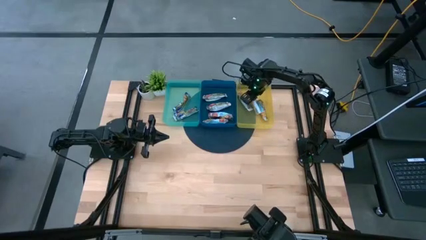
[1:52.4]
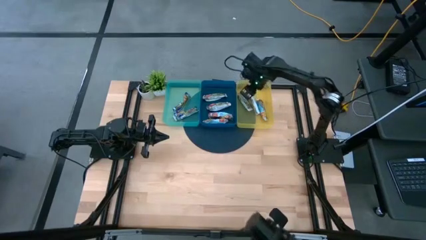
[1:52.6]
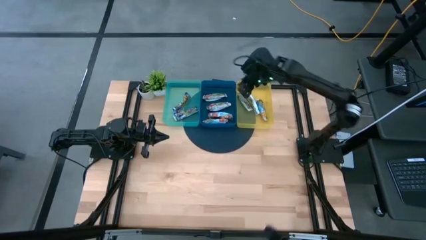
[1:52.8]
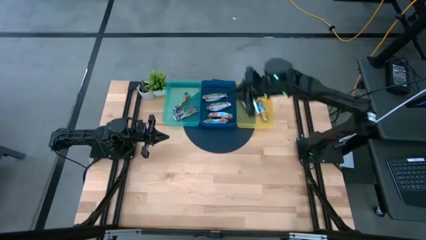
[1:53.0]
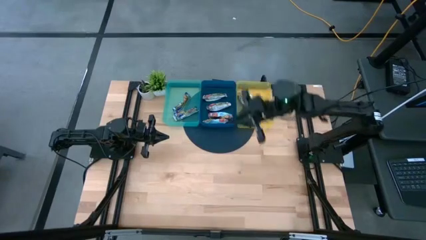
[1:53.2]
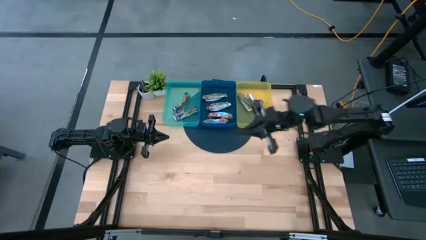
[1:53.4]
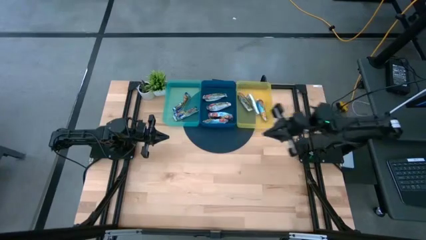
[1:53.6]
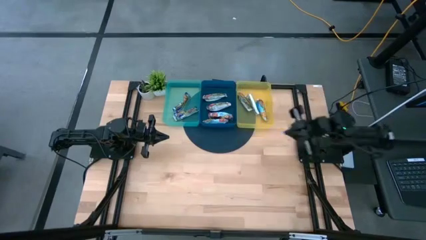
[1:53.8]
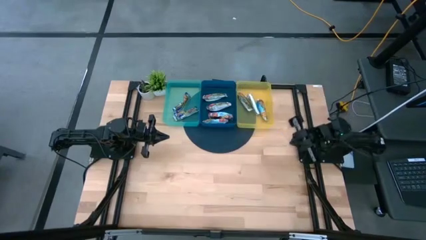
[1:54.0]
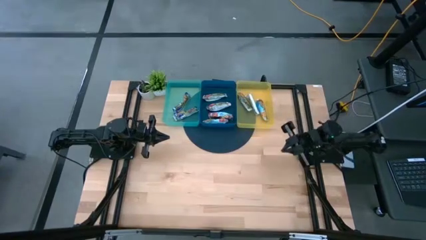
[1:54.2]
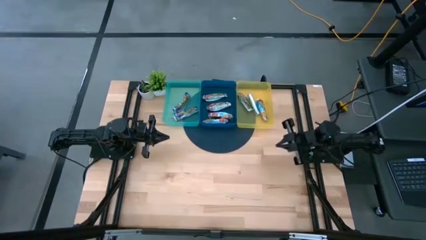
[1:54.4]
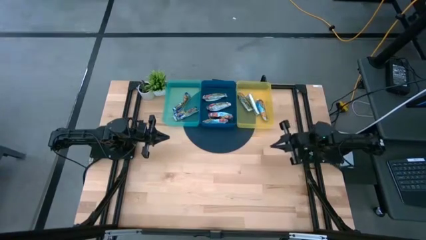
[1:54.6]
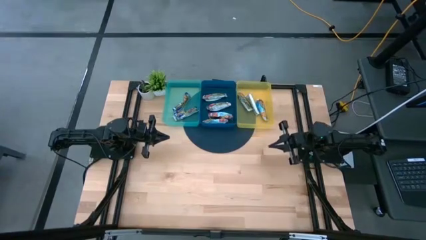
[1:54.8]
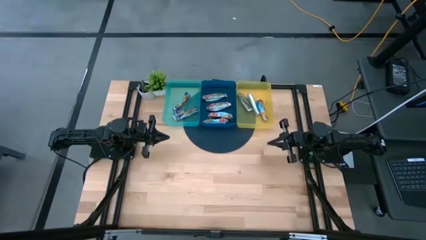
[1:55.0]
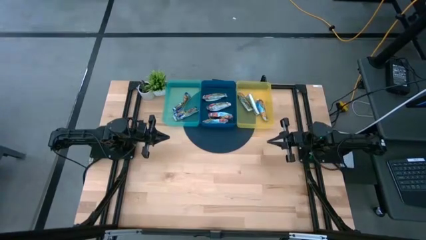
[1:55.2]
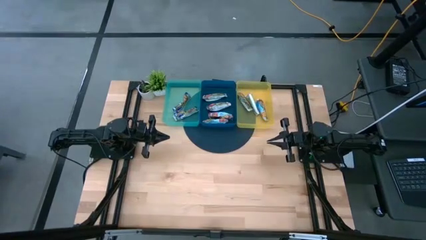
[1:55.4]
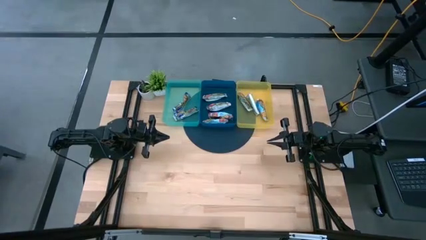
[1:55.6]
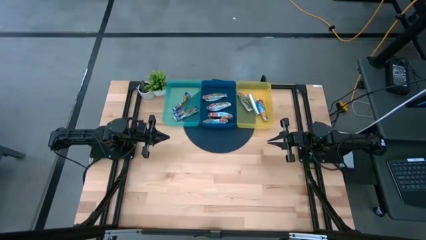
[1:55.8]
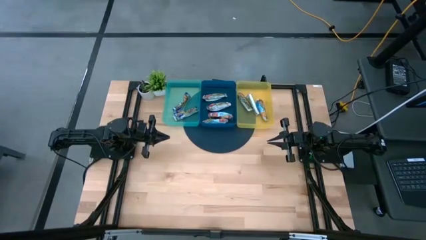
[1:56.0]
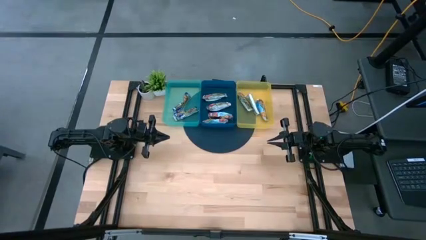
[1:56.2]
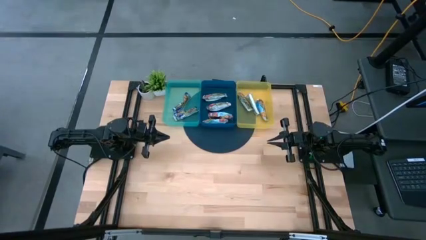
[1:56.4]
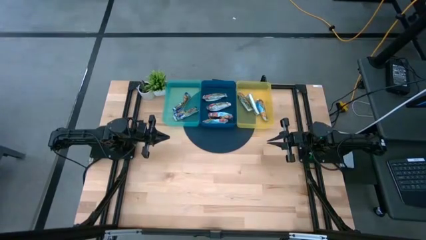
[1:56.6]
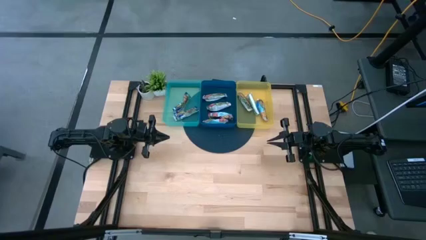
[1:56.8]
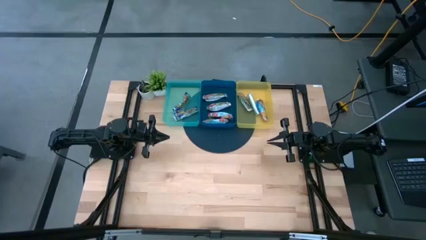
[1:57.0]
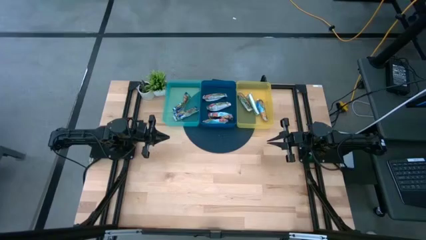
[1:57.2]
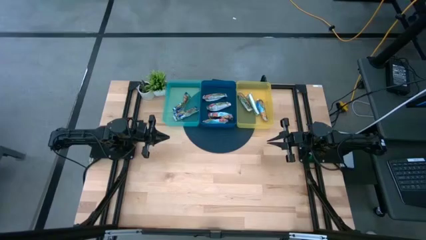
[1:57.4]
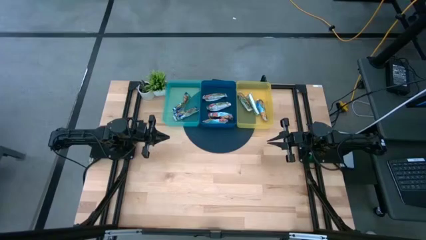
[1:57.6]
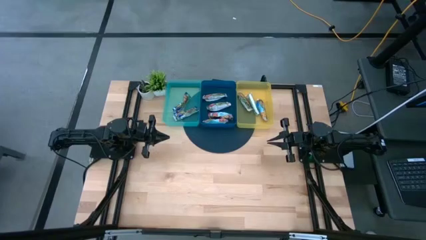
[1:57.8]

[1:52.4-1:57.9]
Task: Pick and place Granola Bars by type
Return to Home Position

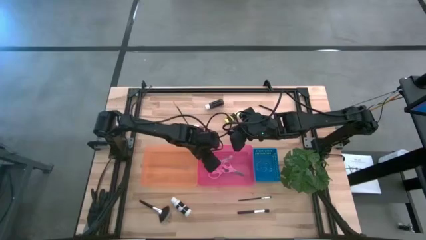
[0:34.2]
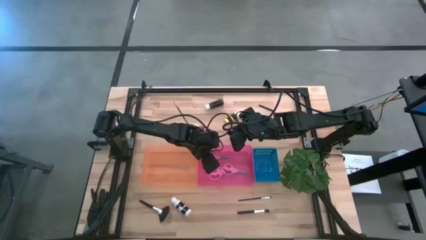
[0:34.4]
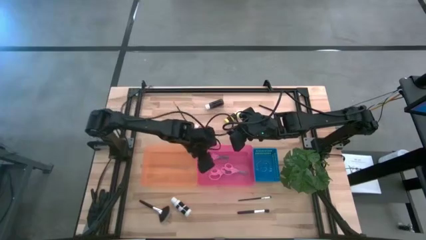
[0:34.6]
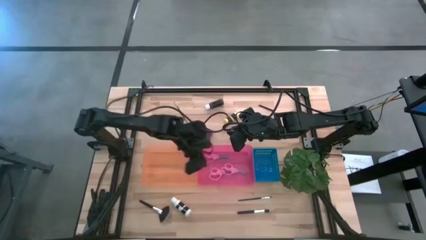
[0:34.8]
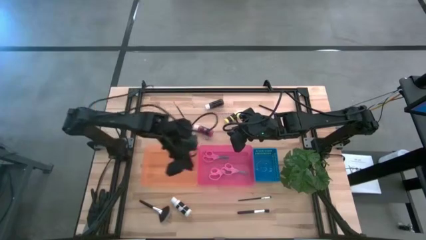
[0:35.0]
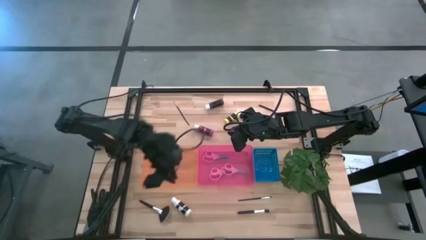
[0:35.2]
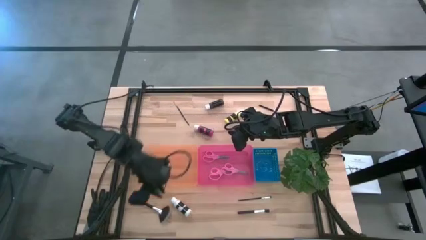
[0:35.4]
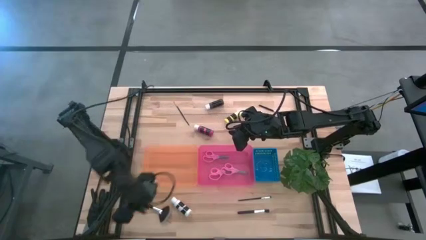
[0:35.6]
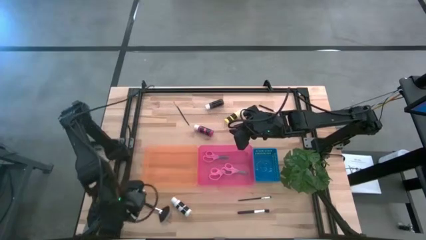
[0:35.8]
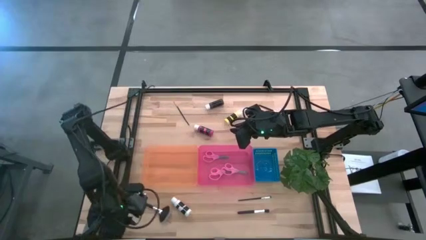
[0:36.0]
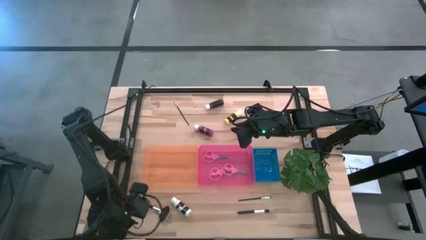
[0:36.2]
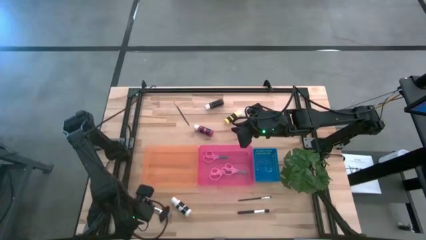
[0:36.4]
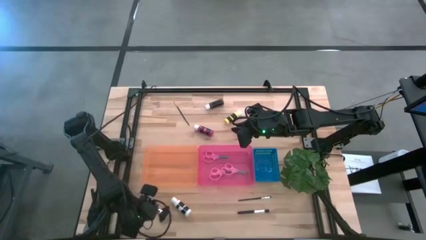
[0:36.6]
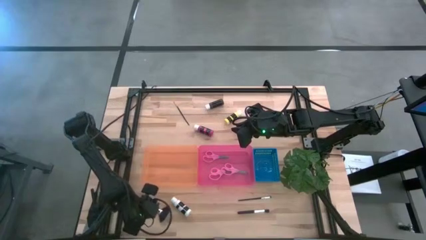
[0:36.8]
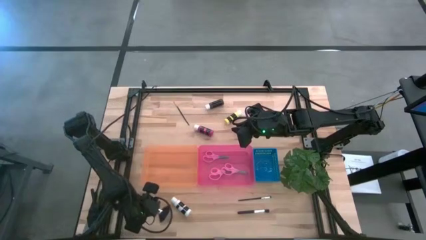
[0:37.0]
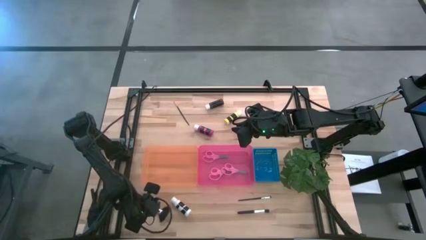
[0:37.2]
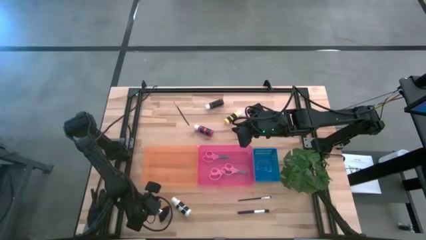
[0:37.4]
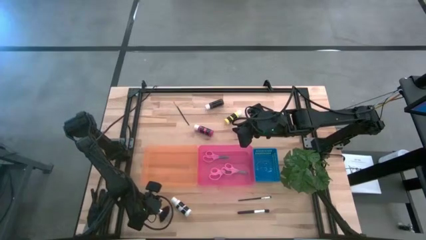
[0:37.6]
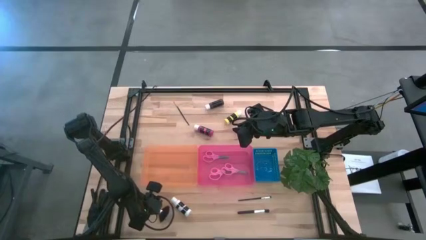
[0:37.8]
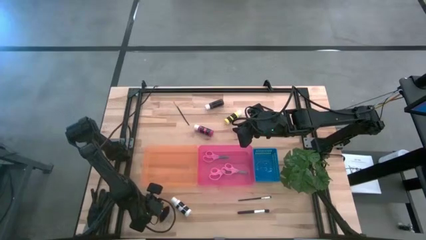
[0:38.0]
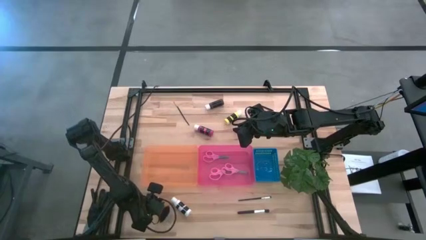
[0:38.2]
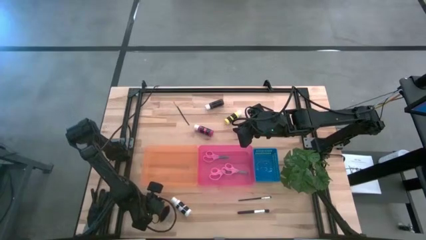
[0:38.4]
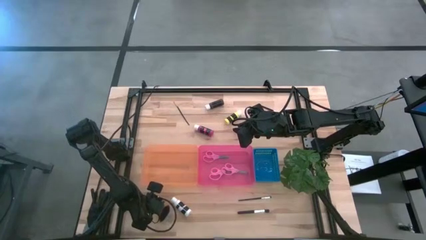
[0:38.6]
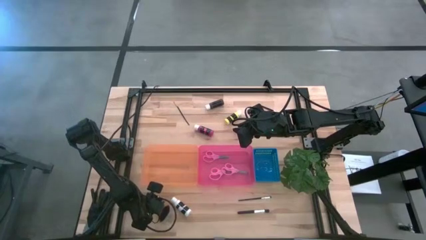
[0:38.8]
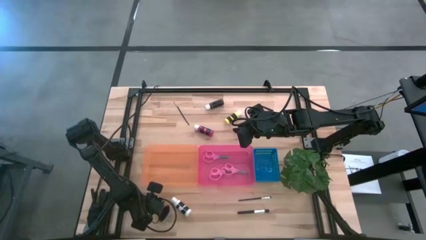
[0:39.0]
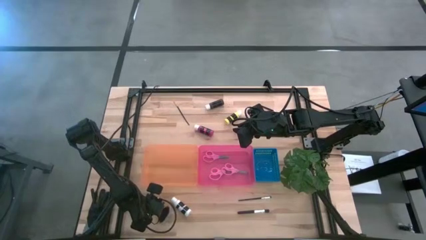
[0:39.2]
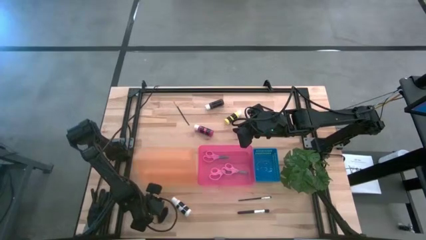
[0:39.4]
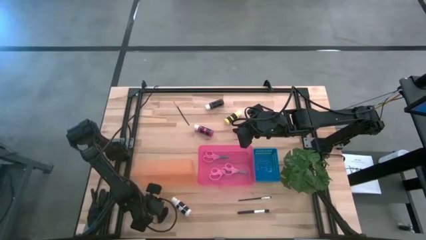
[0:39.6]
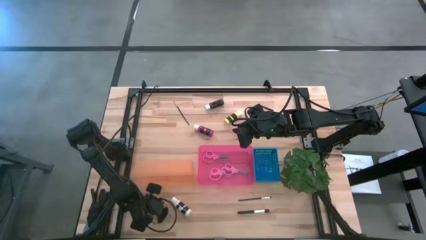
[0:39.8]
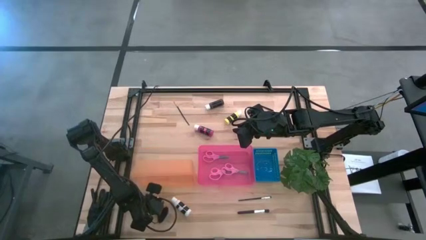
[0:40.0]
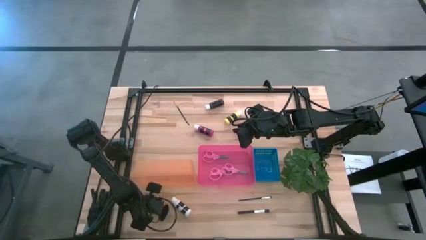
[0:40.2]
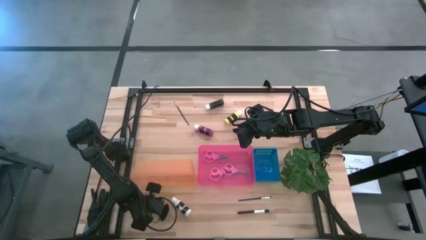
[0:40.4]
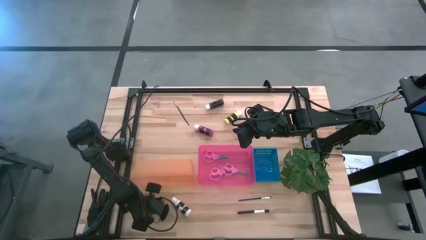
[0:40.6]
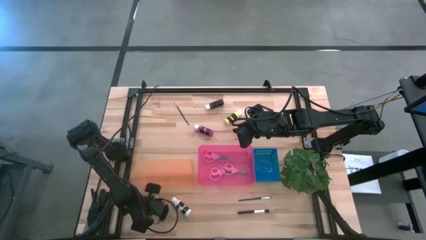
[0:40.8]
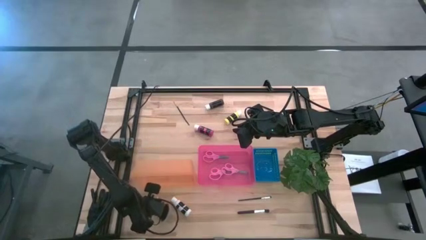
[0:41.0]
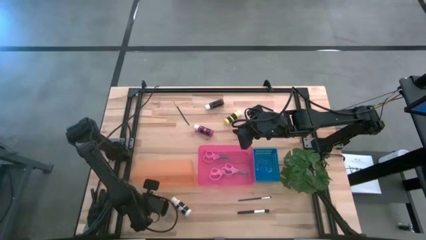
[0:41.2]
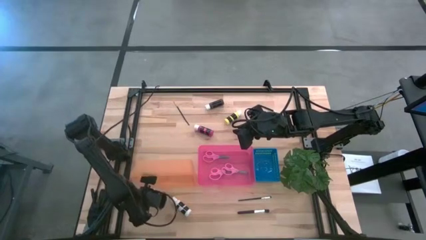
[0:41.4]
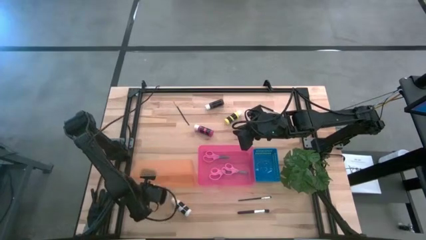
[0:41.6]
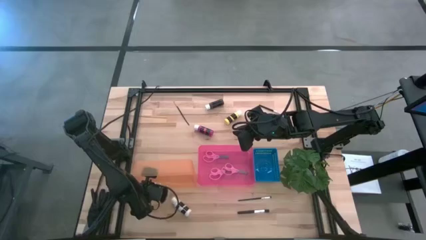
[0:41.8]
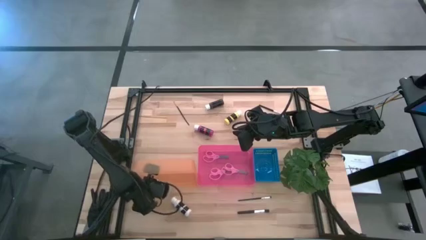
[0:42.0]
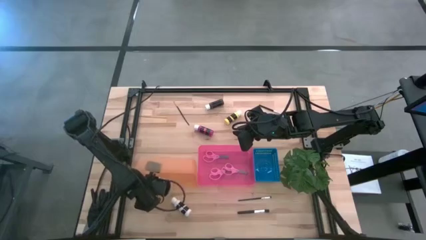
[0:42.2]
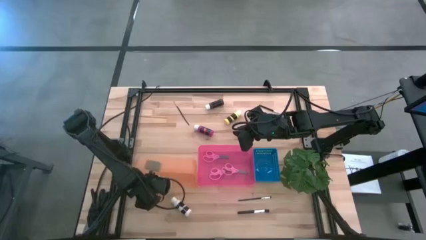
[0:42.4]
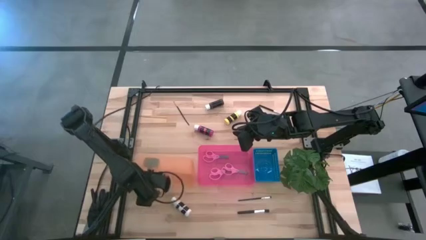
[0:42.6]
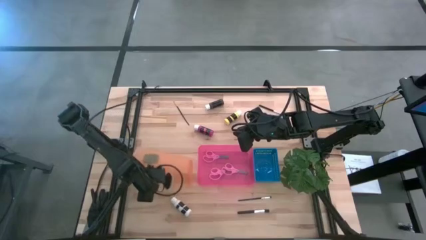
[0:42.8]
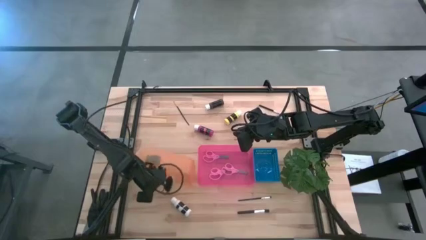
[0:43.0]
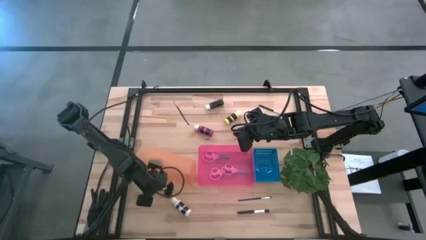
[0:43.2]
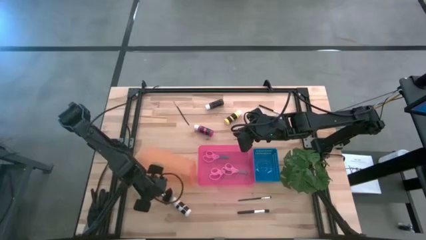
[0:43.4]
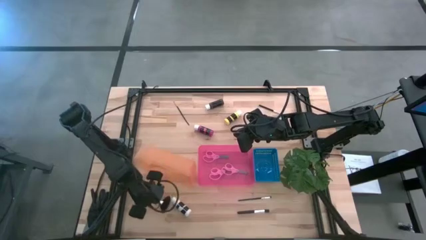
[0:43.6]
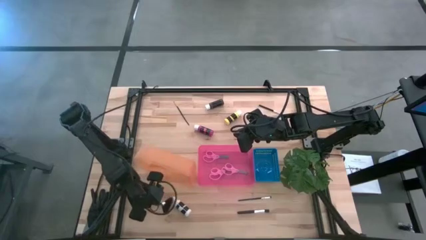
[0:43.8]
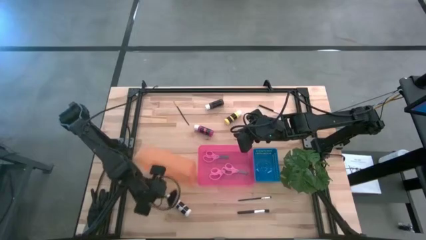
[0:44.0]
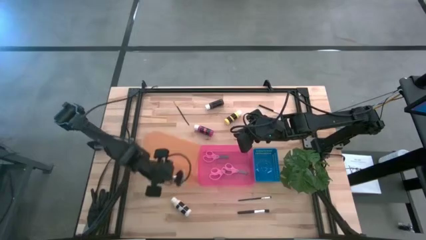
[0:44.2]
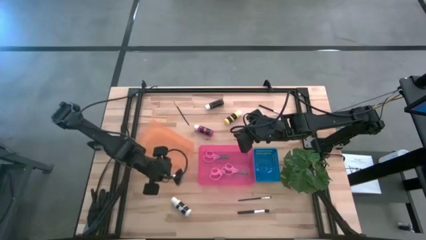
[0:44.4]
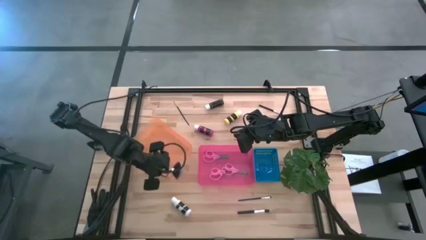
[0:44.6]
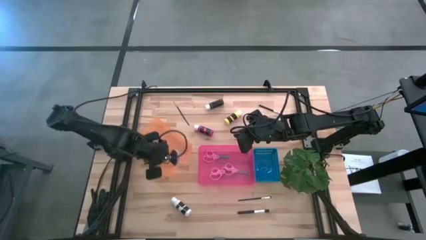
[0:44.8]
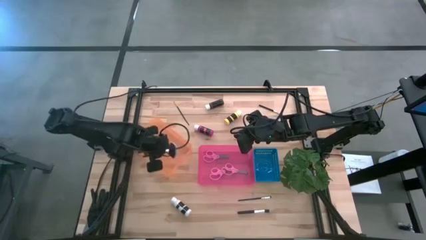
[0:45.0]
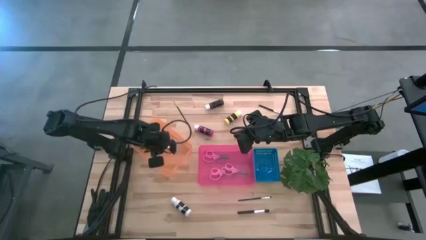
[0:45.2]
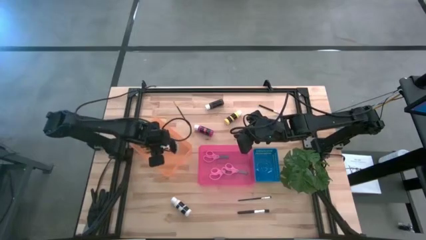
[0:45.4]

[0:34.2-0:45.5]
Task: Pick & Place Paint Supplies
Put the silver highlighter brush into the orange bin
